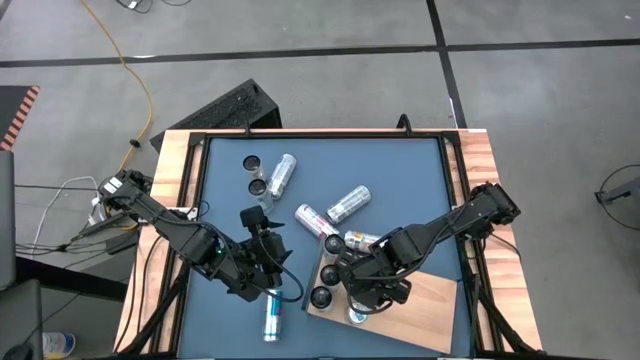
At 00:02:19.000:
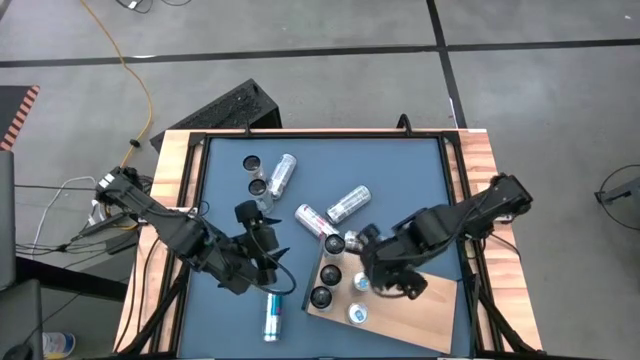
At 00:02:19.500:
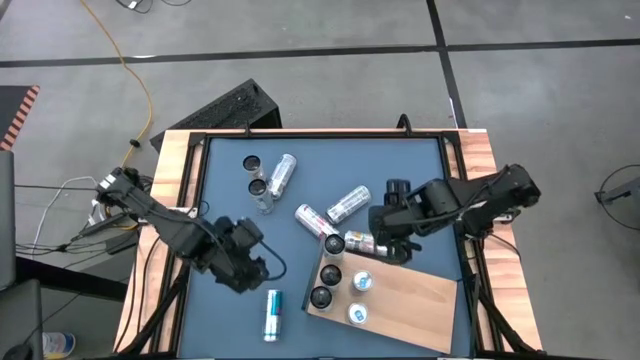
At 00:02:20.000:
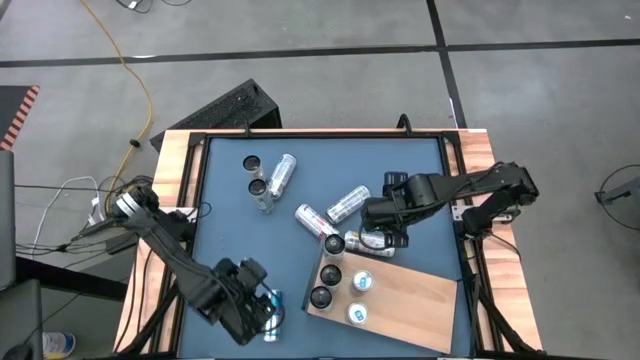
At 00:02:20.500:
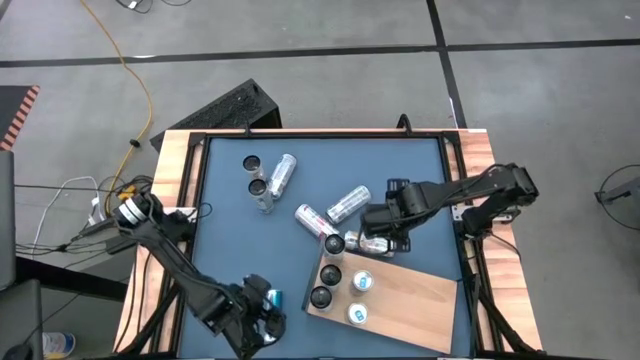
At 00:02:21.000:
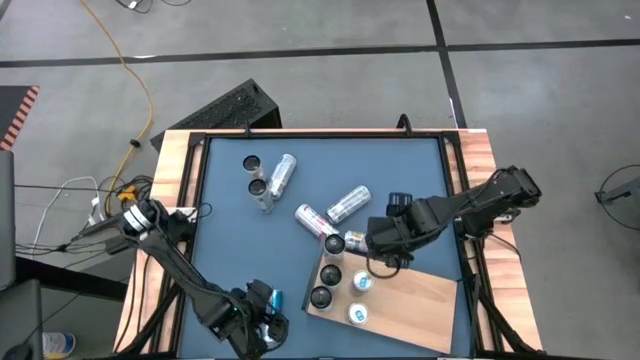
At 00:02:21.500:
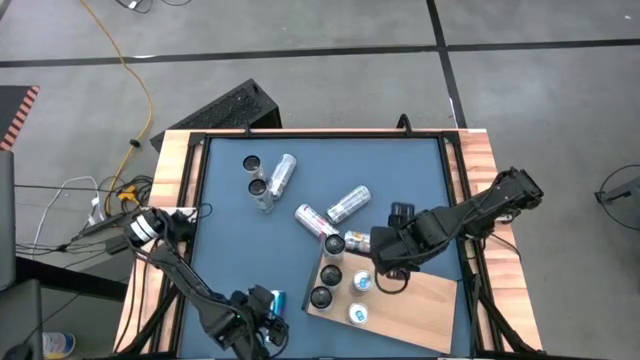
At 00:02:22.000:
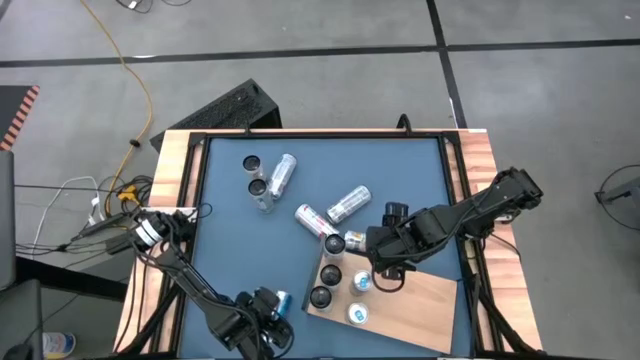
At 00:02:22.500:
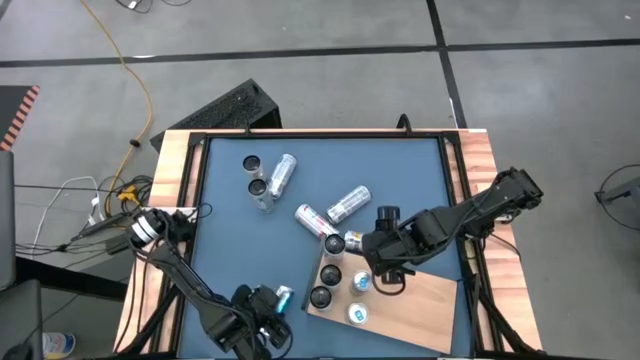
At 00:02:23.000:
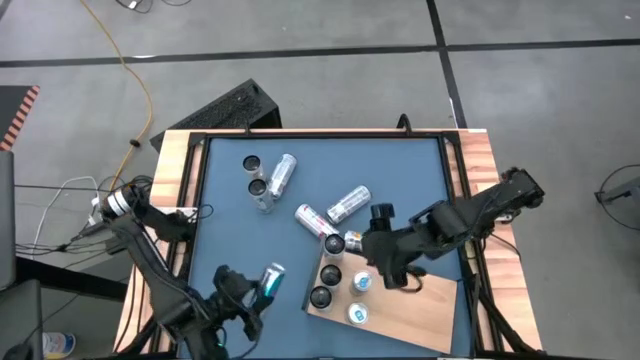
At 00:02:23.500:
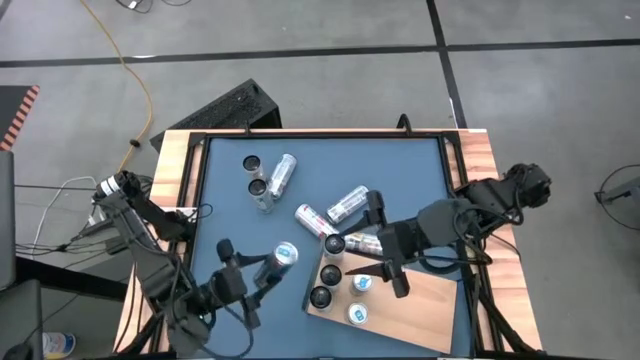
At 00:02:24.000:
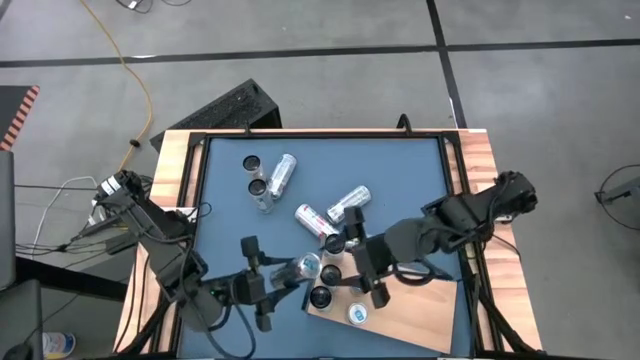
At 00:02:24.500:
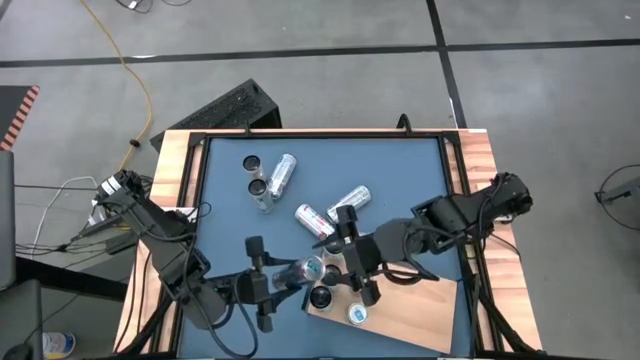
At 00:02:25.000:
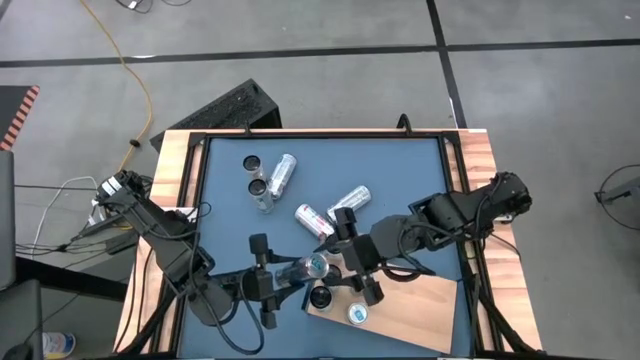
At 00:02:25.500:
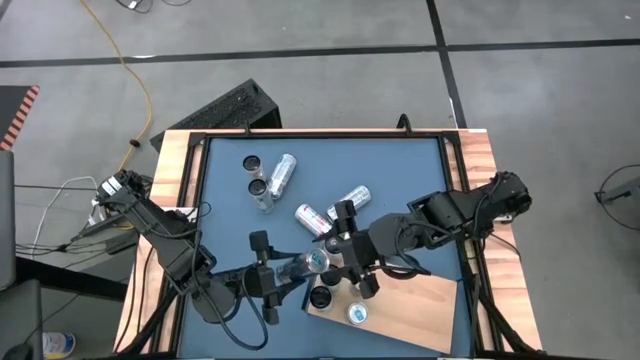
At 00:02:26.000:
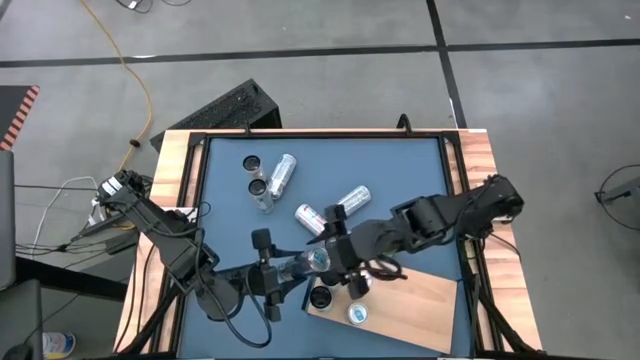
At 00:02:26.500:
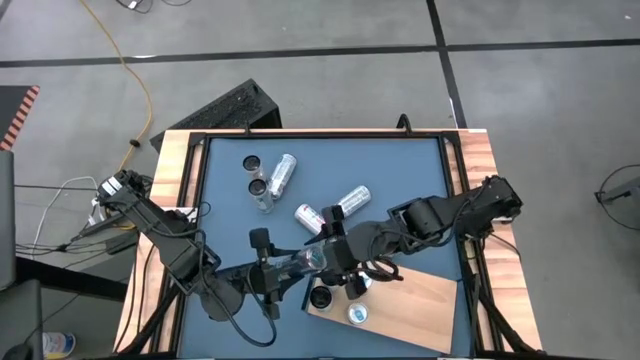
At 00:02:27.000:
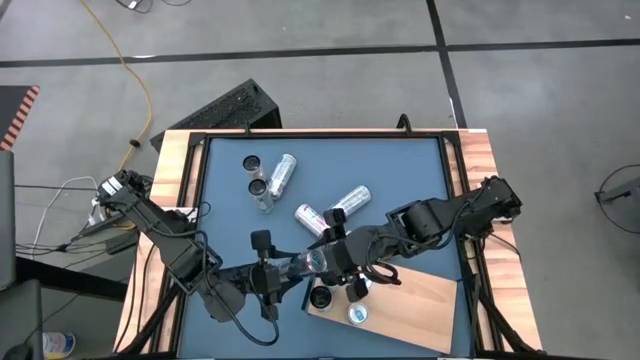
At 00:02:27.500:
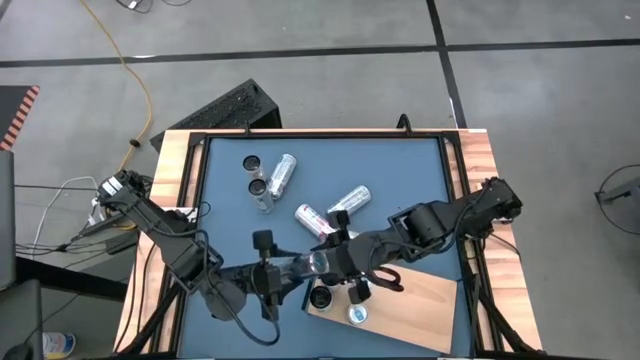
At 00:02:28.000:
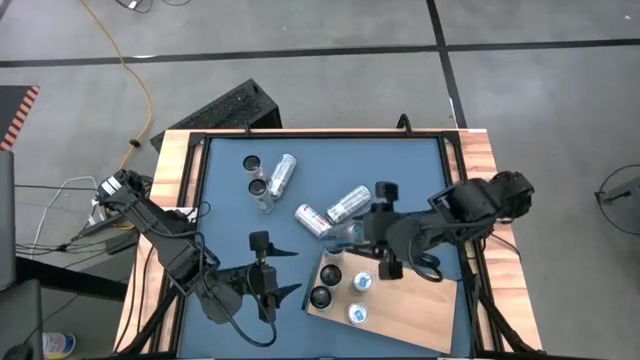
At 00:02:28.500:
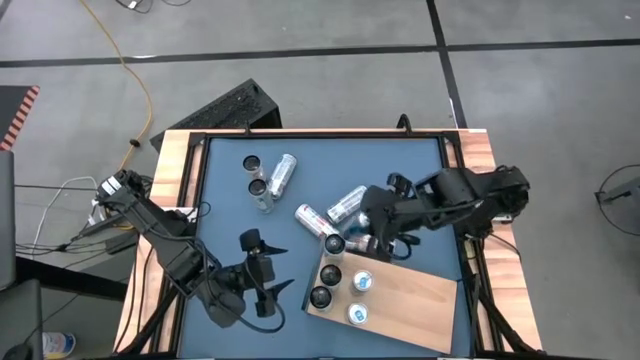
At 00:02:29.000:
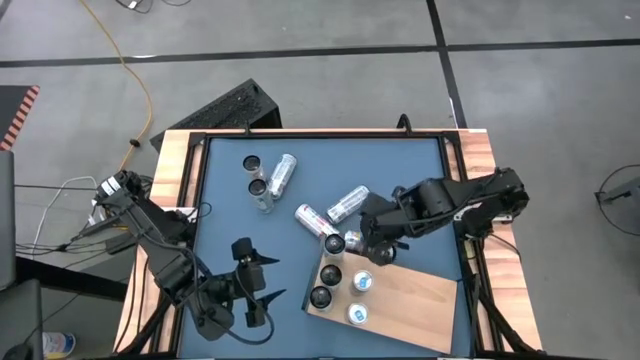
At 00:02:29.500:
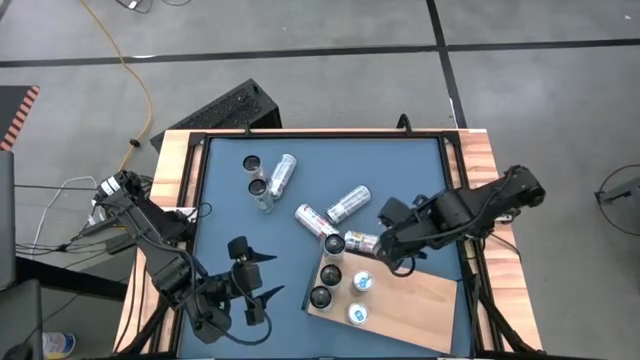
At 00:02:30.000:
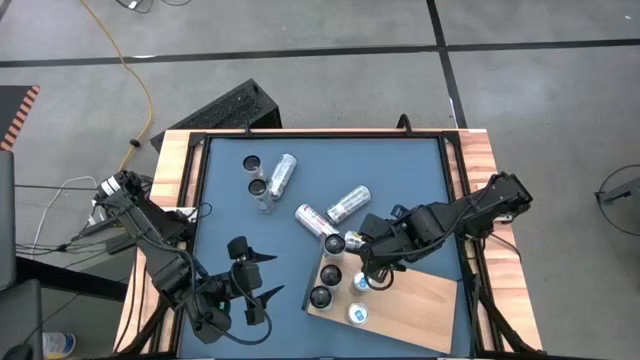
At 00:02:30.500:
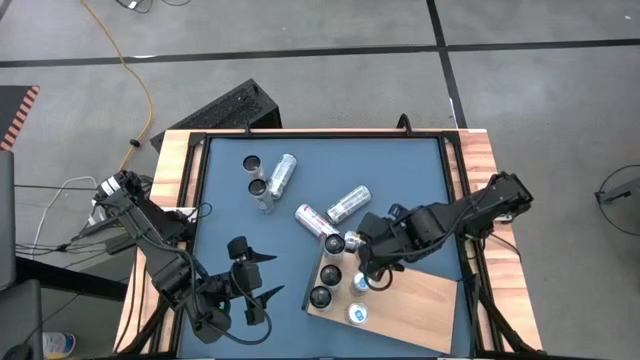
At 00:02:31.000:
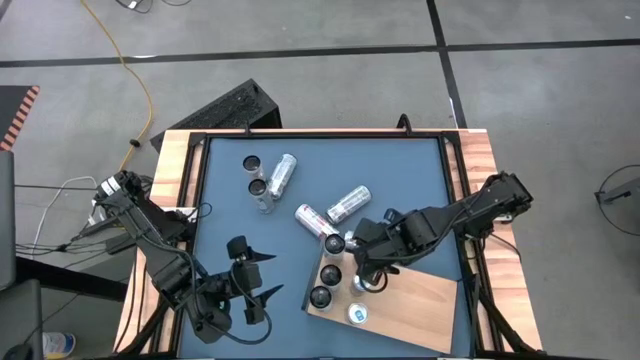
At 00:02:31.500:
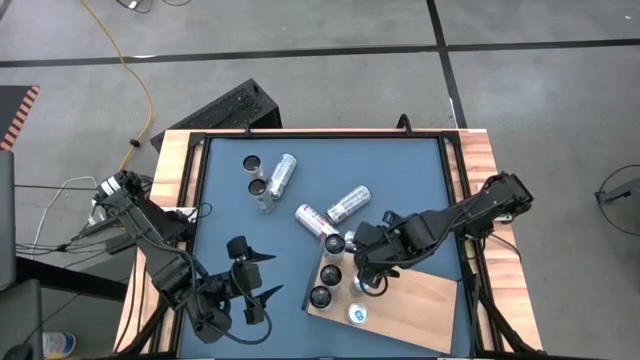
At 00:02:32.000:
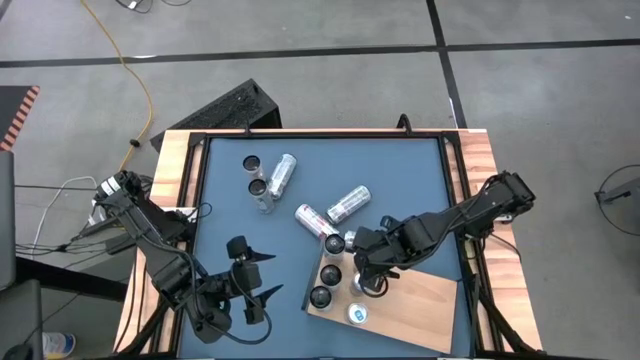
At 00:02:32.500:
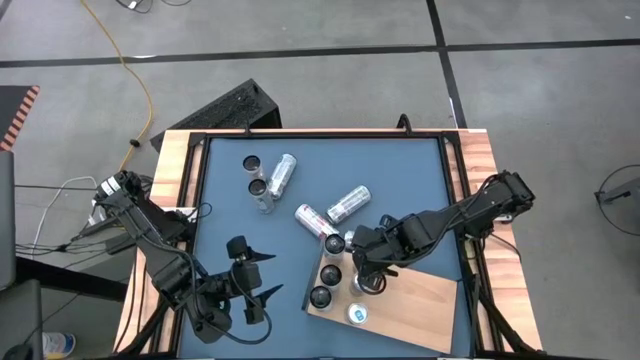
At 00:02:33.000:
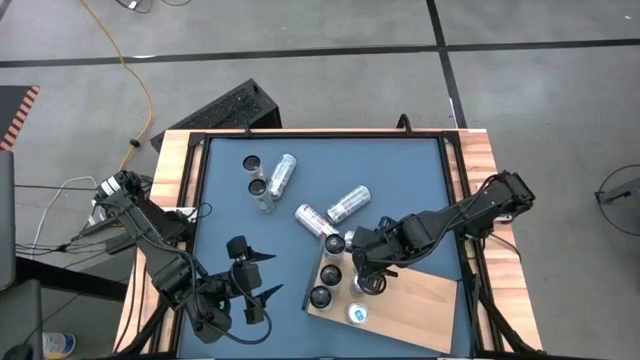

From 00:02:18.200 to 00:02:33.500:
Task: Place canned beverage on shelf
Put the blue soda can on the shelf

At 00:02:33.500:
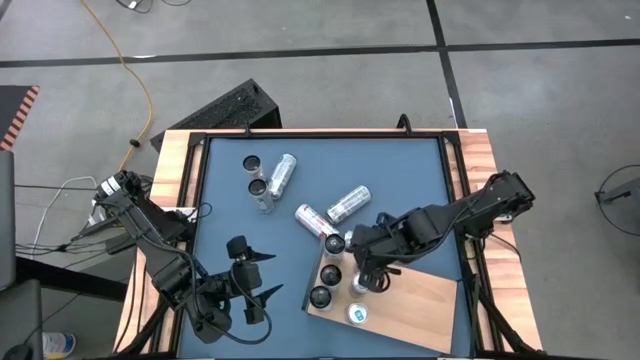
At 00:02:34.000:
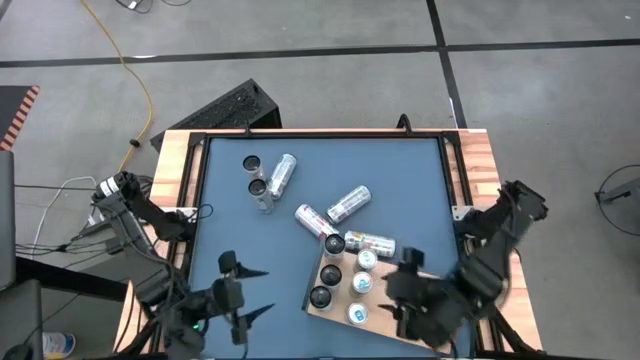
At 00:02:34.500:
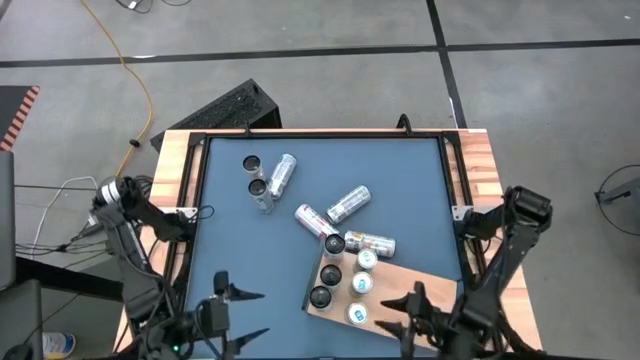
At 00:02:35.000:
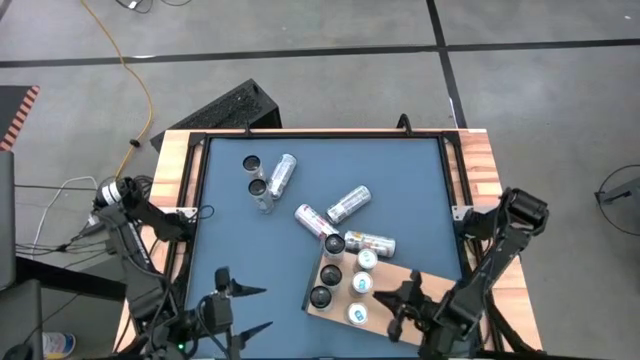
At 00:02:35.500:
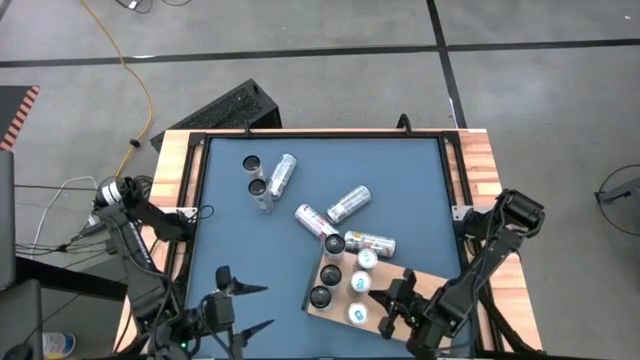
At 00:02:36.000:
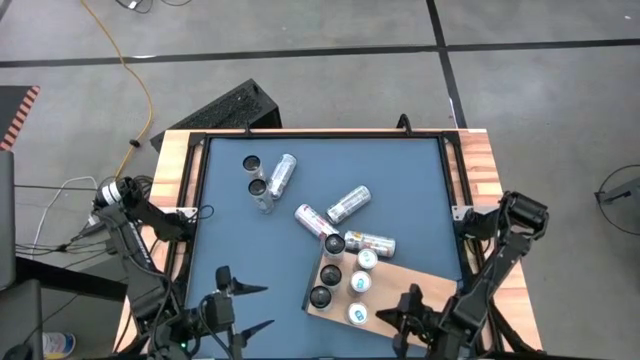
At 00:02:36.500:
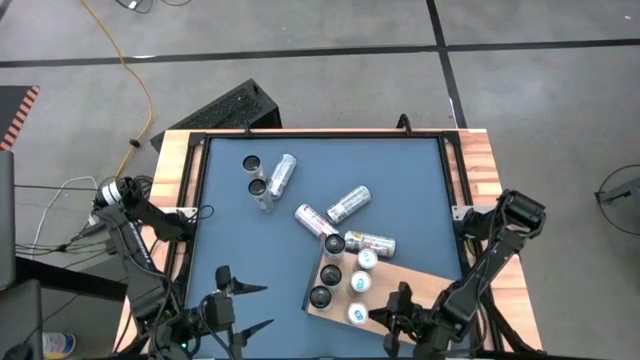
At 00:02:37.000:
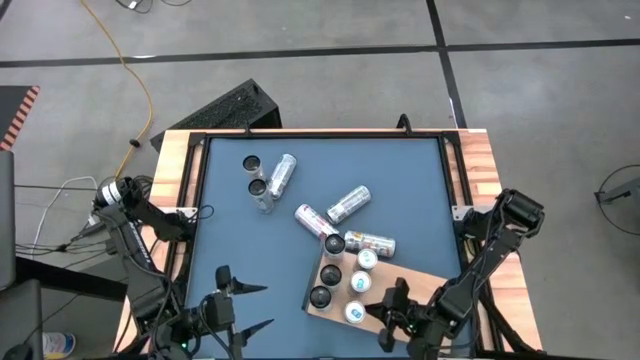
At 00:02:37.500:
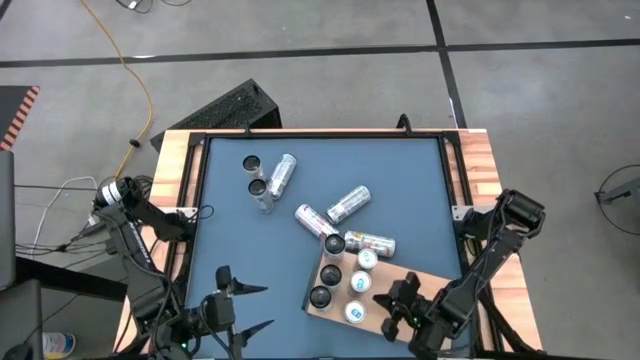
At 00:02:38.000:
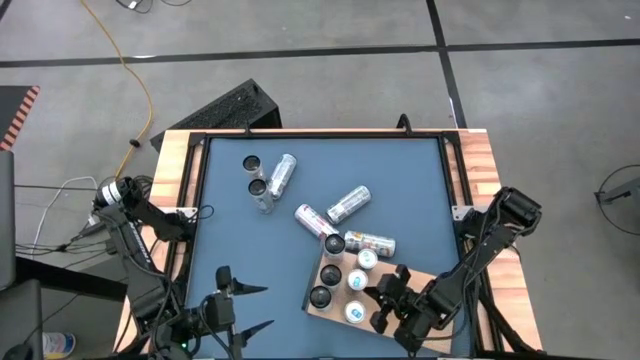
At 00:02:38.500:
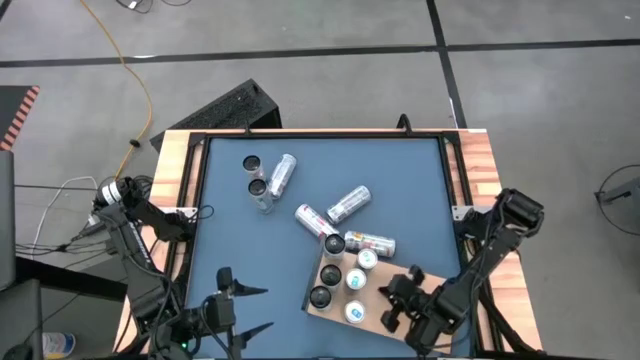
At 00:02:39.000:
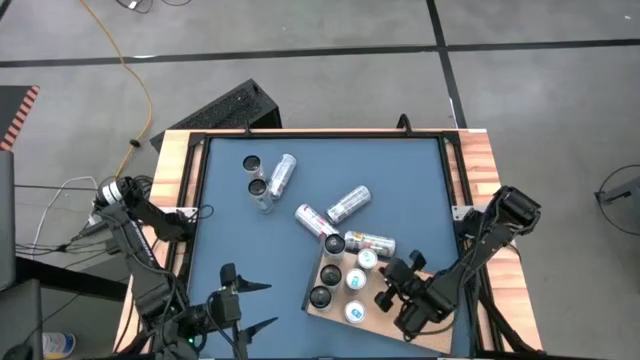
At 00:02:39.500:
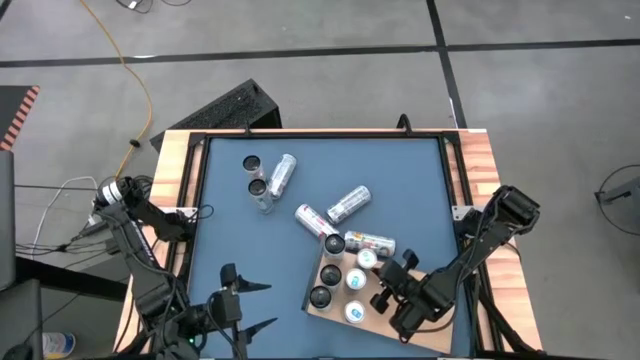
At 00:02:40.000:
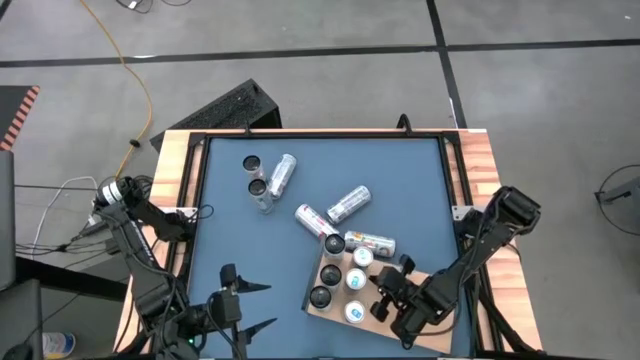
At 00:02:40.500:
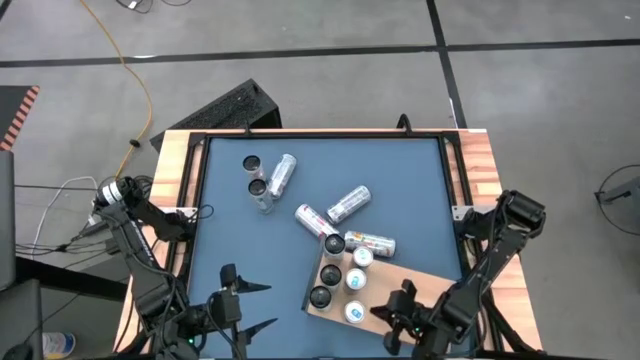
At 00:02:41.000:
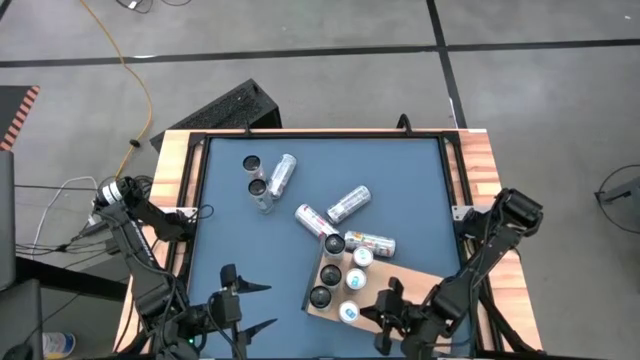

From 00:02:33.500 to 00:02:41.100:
Adjust the blue soda cans on the shelf
